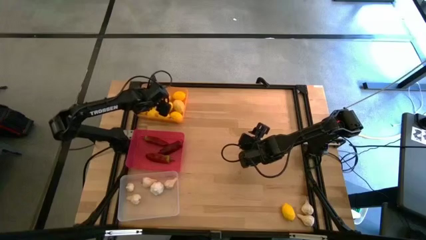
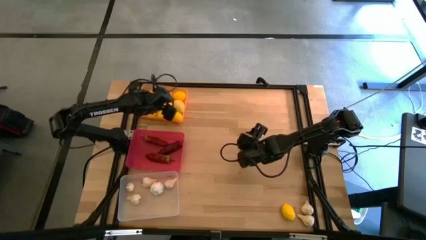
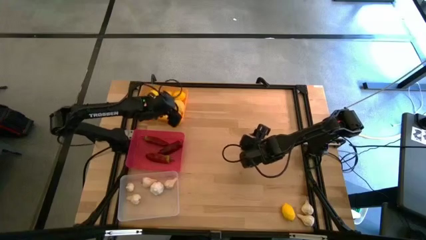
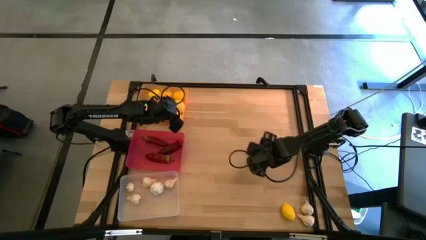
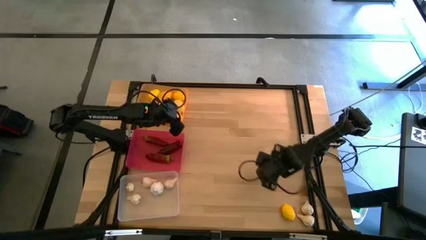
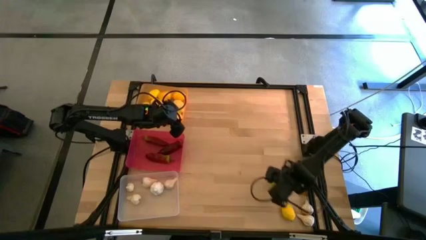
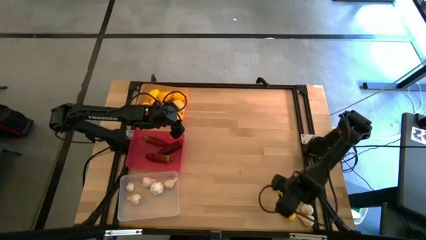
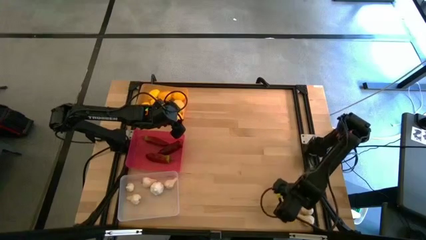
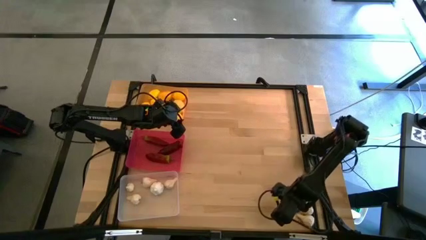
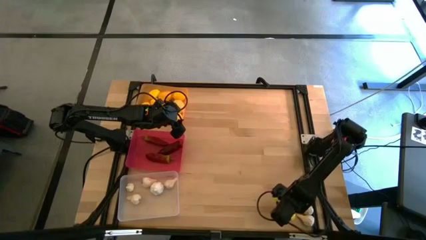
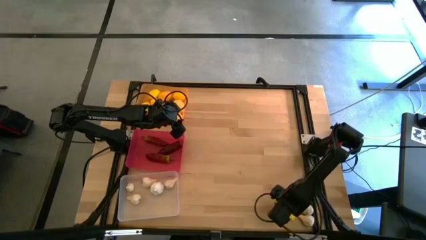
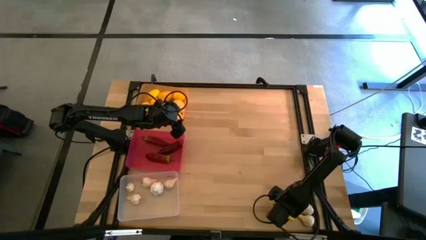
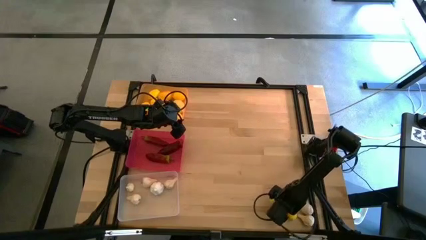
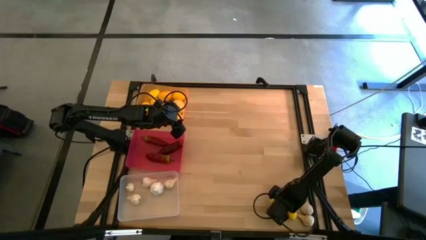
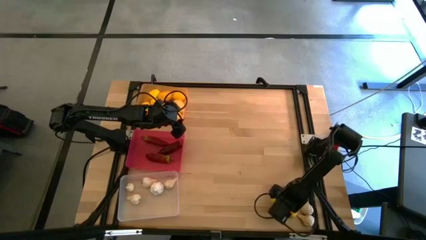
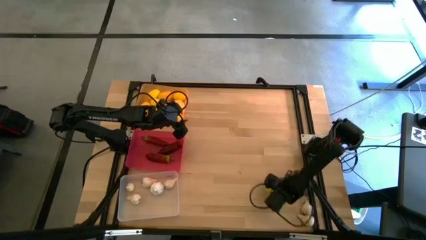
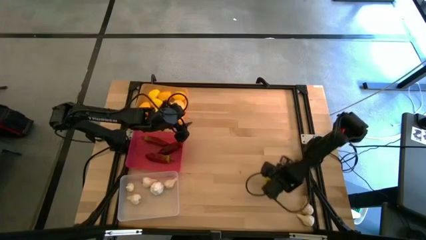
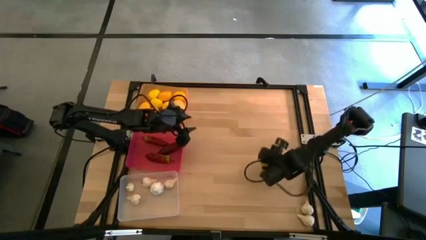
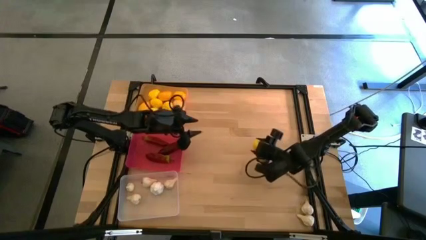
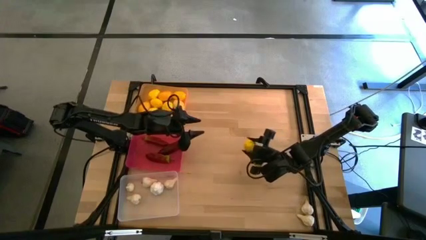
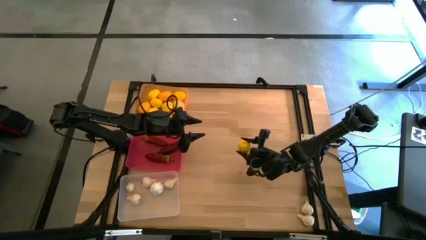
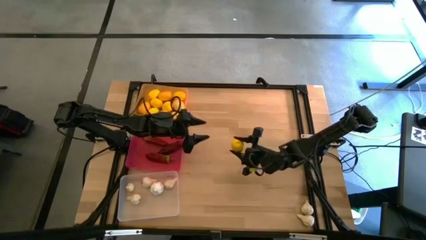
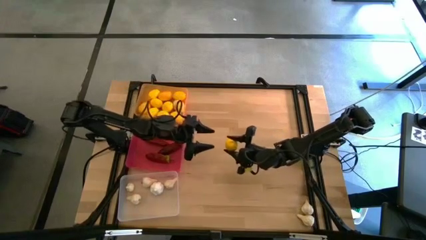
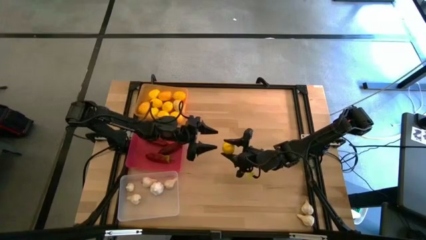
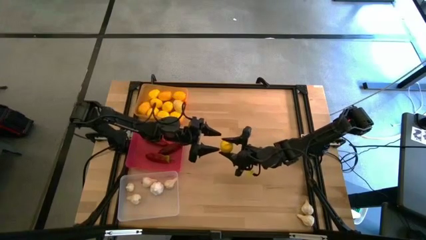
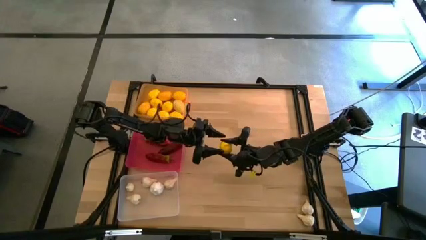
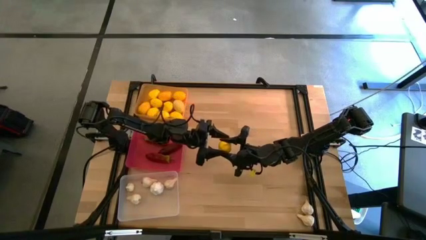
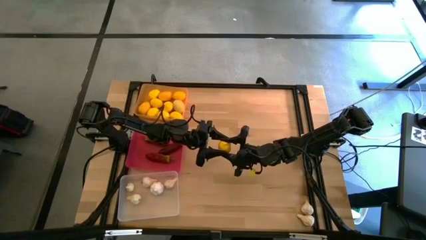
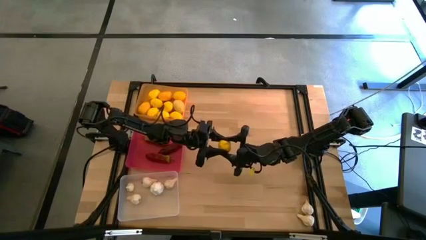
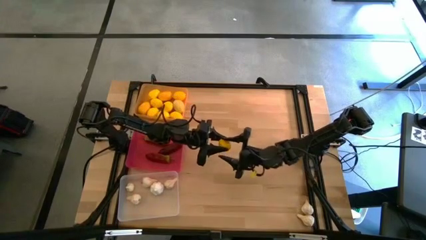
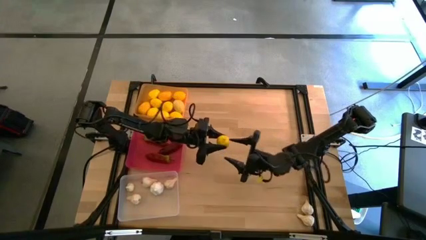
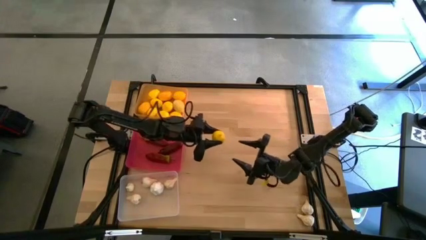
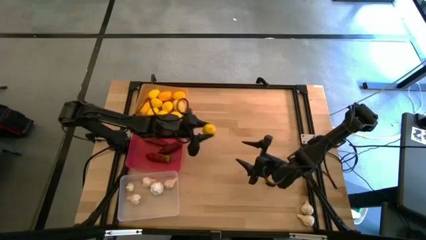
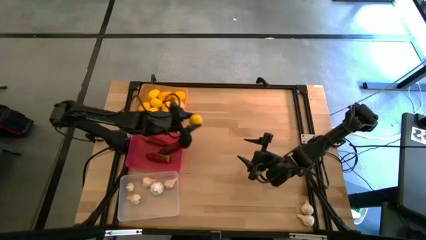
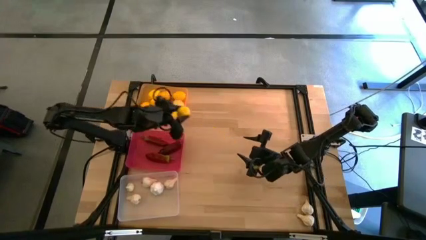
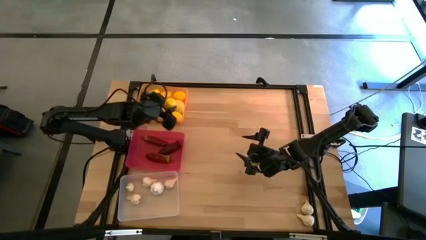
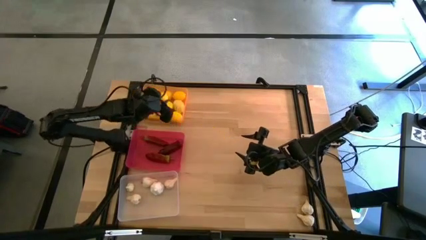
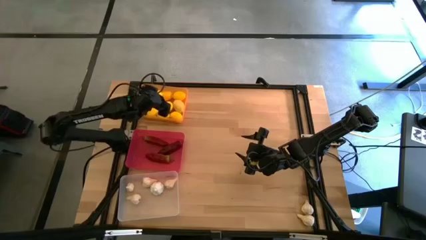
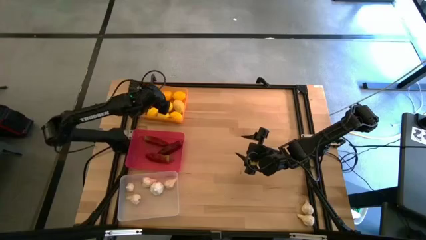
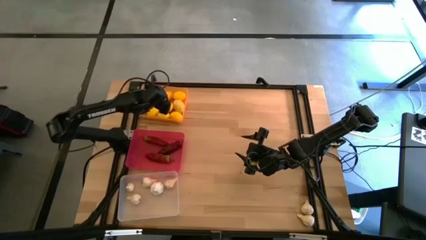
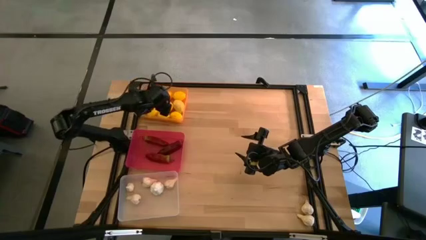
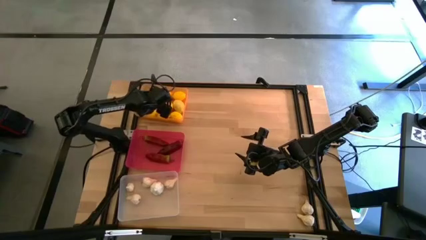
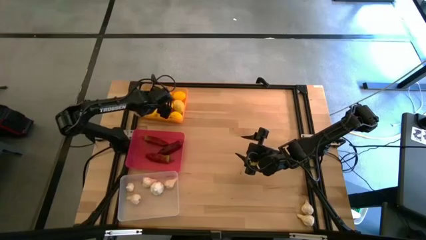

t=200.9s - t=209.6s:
Task: Sort produce into baskets
Put the lemon into the yellow bin

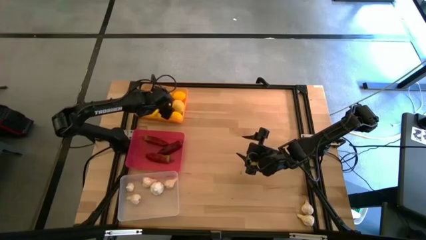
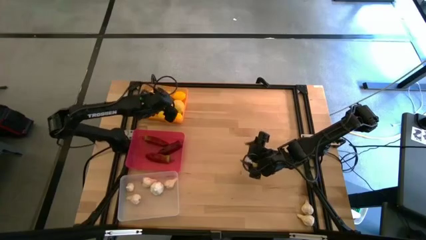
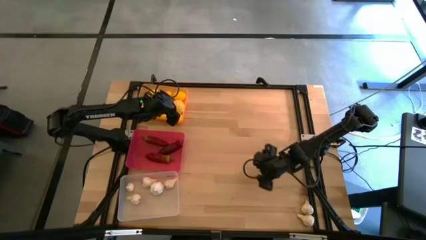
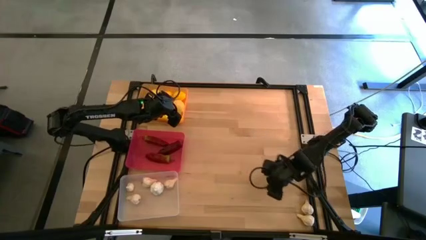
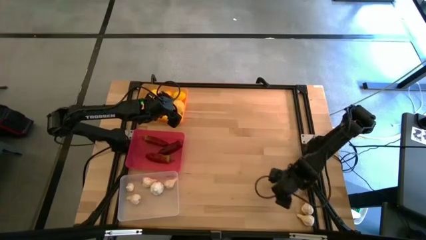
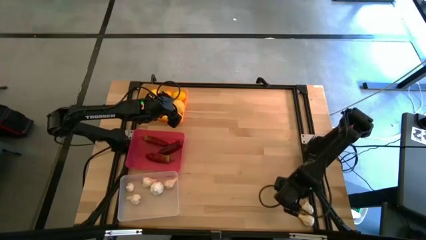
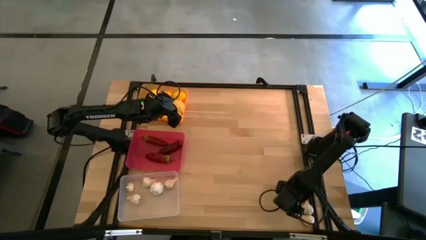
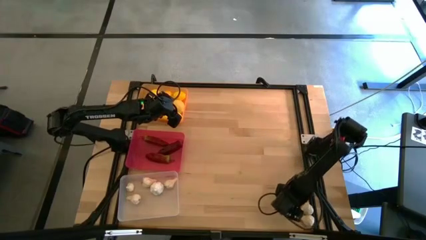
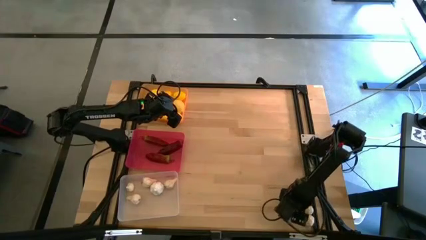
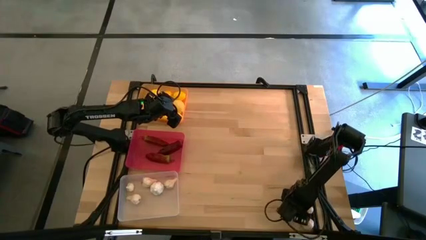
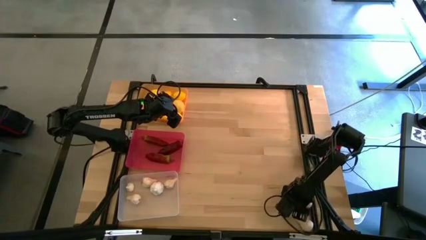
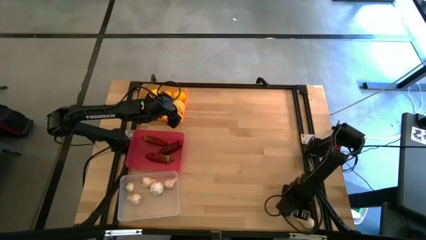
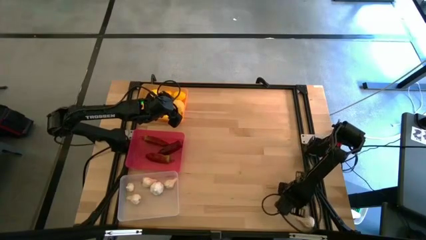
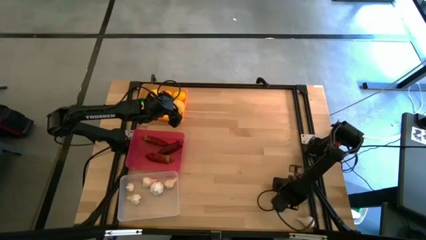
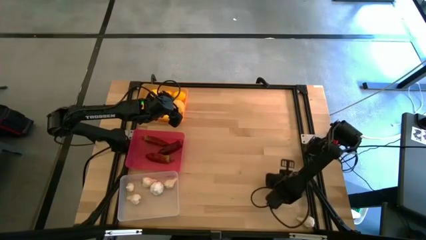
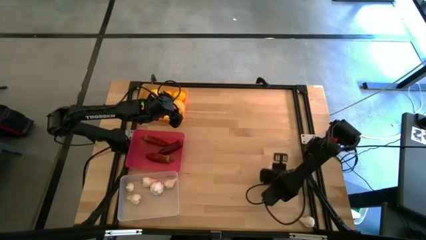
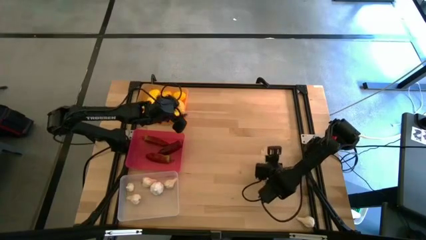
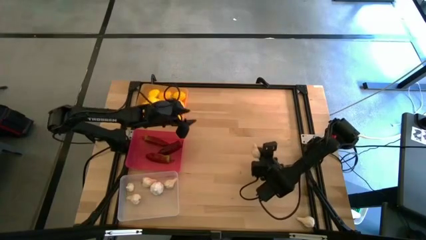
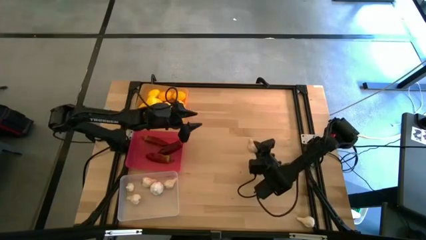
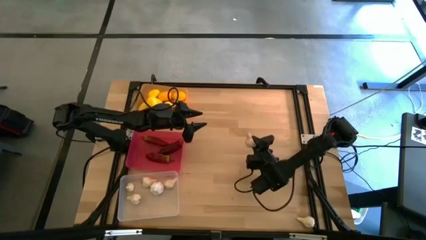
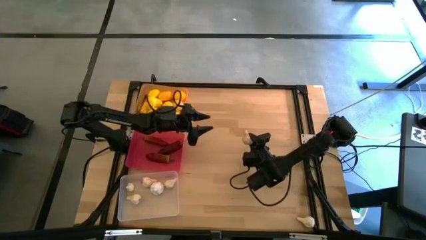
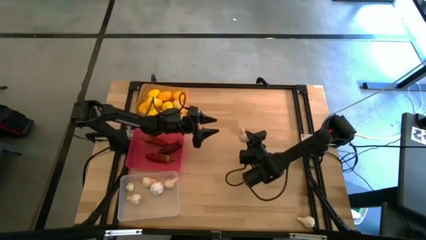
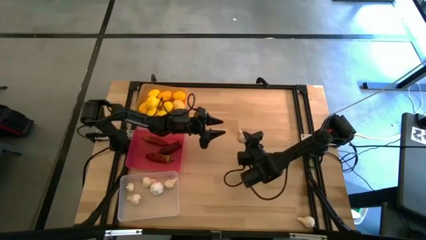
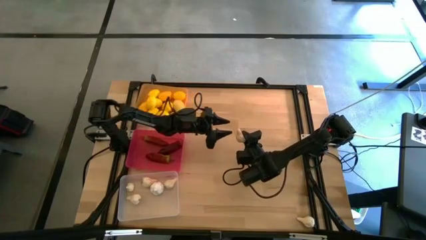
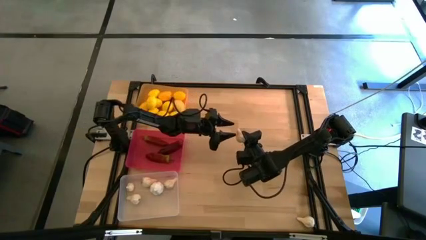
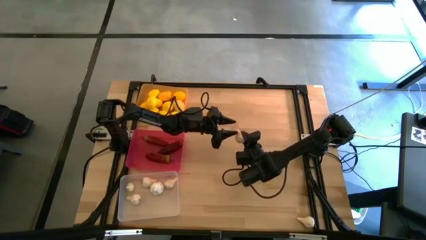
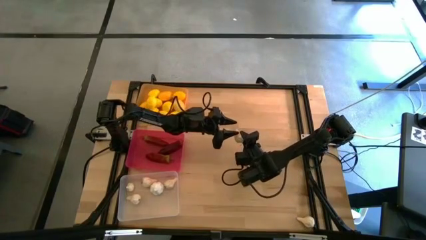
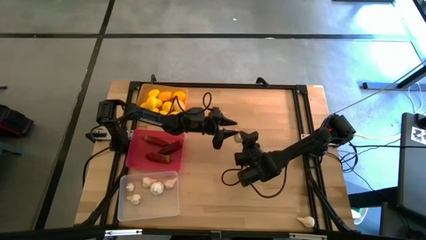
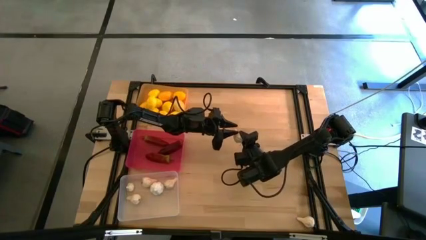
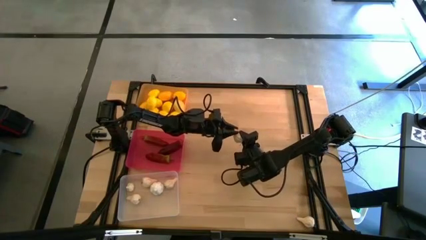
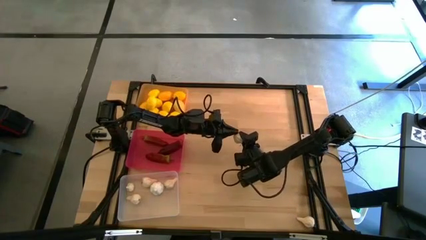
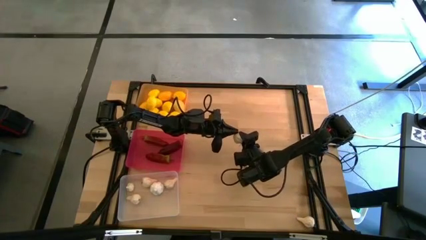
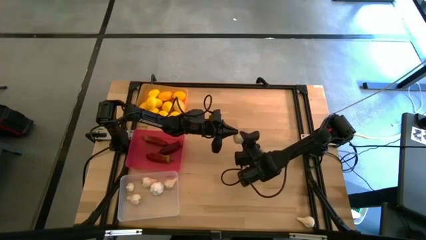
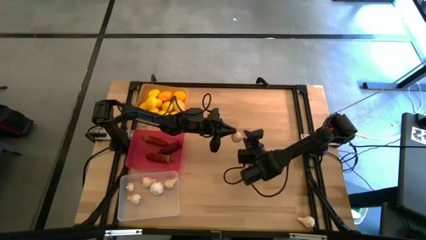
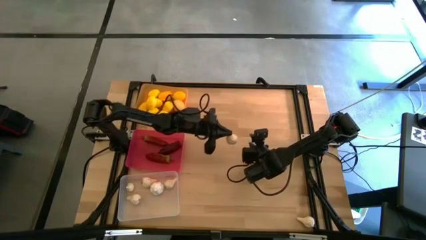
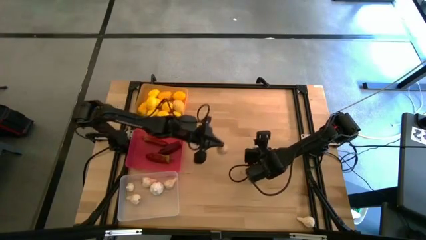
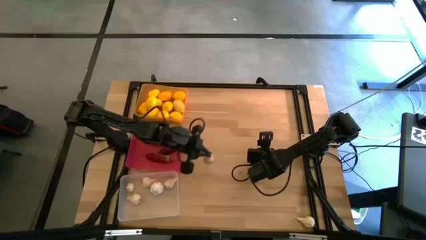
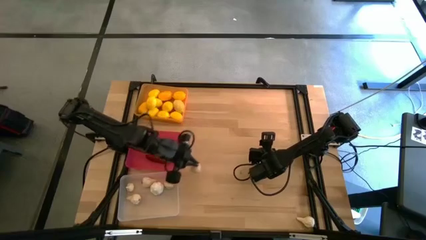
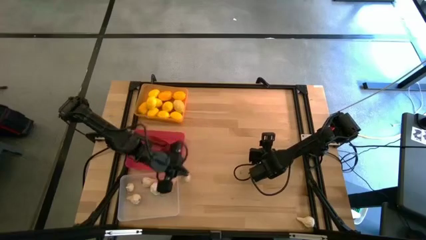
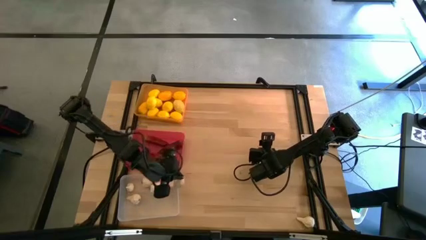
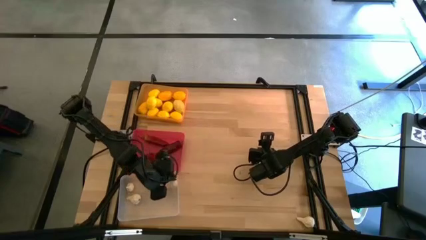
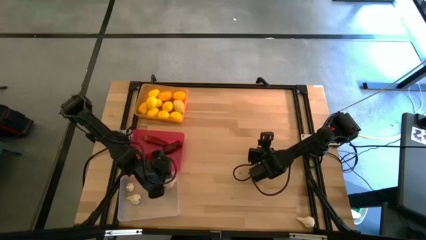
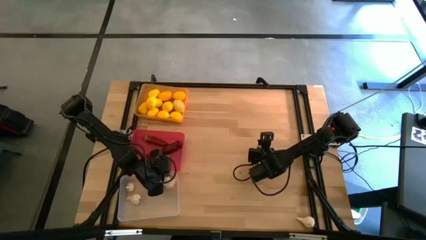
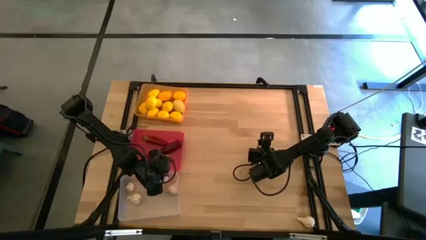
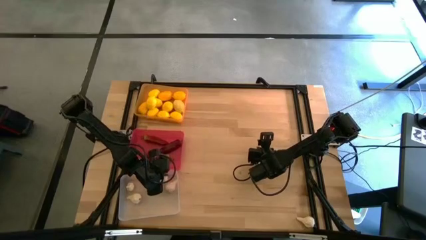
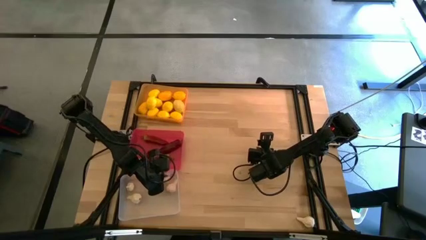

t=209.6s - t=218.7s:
Put the garlic into the transparent bin
